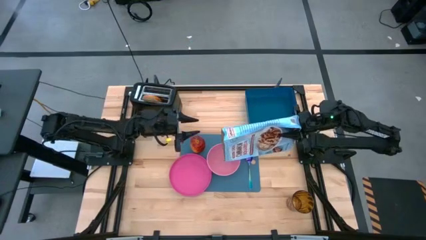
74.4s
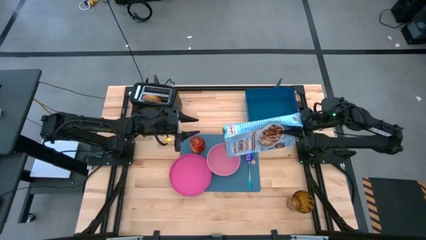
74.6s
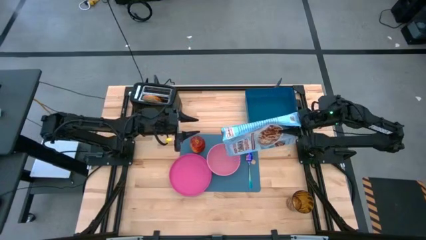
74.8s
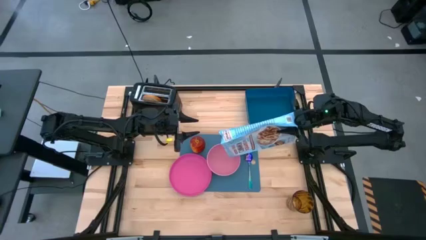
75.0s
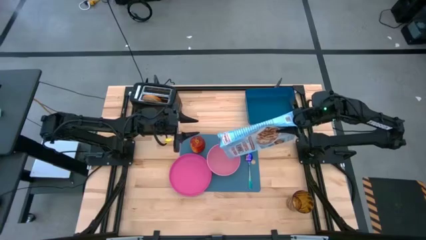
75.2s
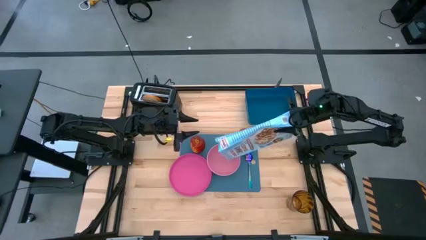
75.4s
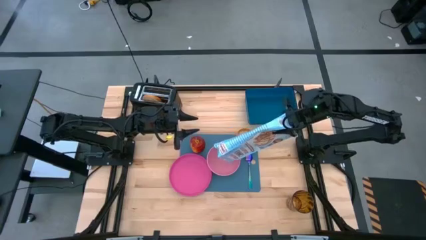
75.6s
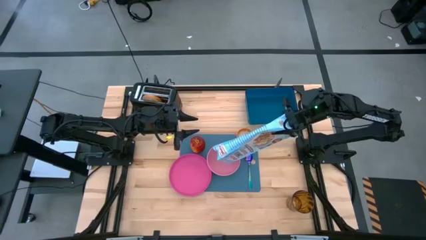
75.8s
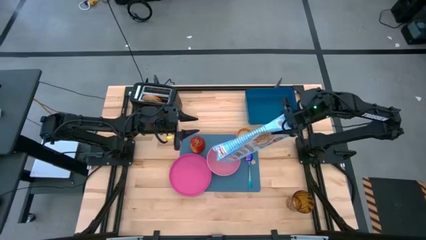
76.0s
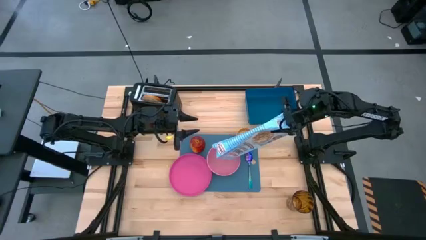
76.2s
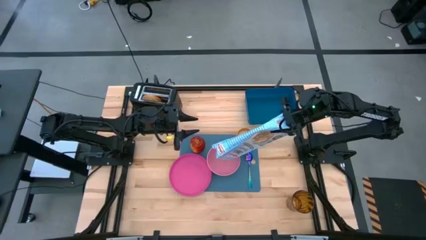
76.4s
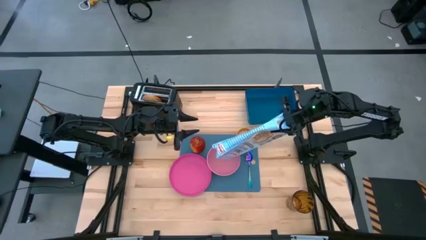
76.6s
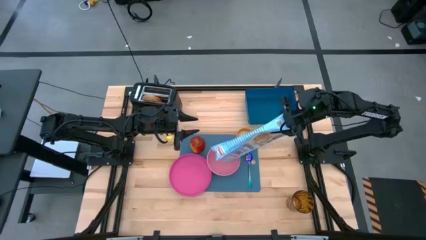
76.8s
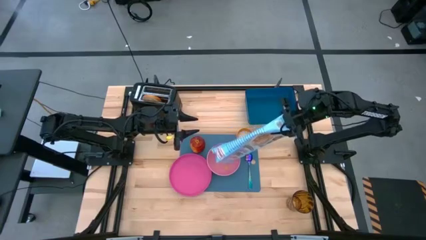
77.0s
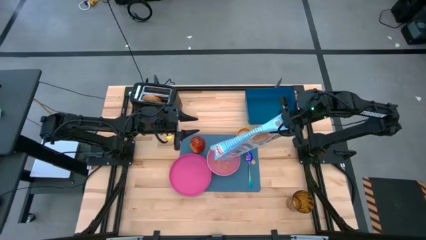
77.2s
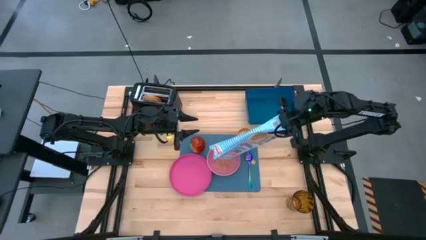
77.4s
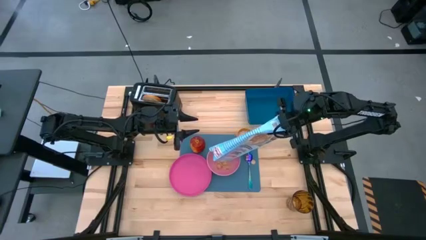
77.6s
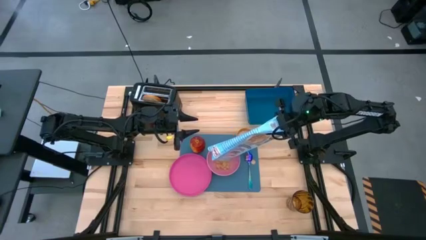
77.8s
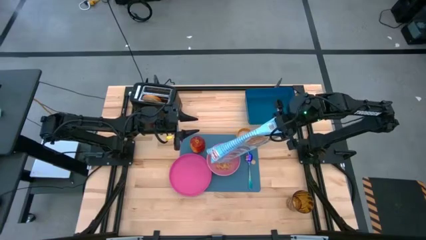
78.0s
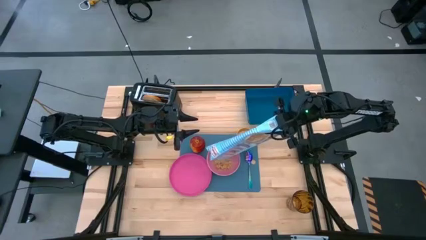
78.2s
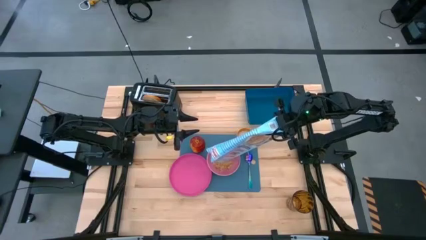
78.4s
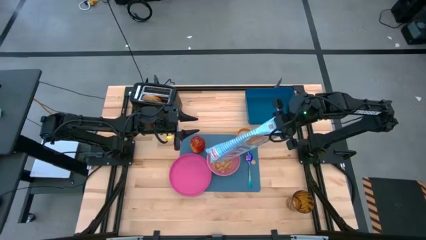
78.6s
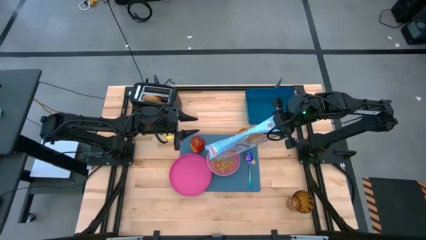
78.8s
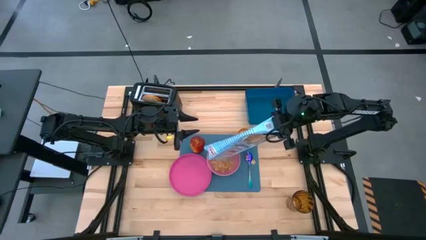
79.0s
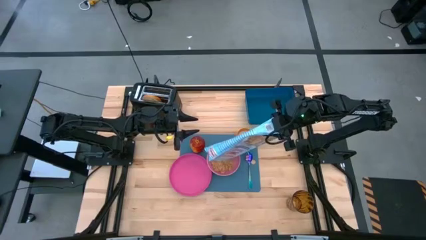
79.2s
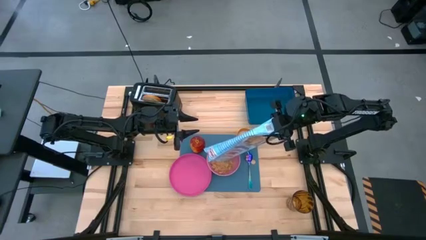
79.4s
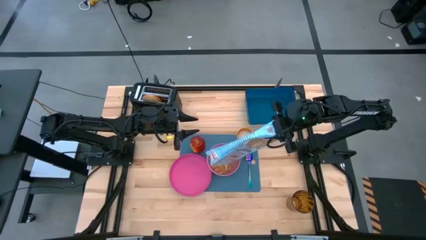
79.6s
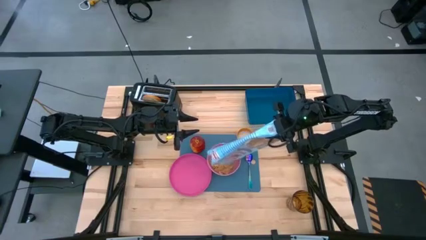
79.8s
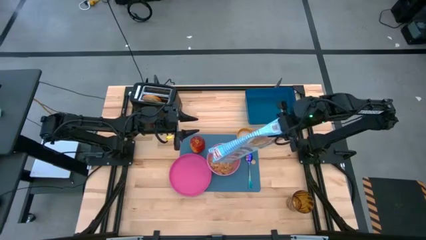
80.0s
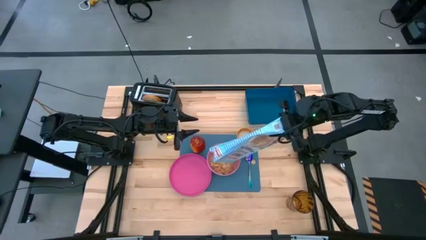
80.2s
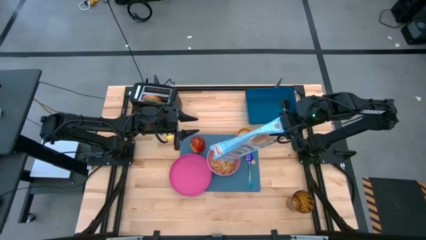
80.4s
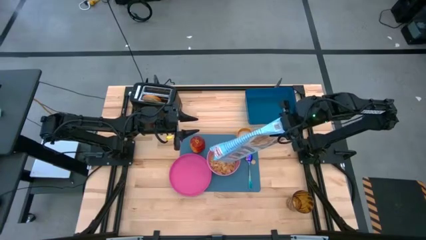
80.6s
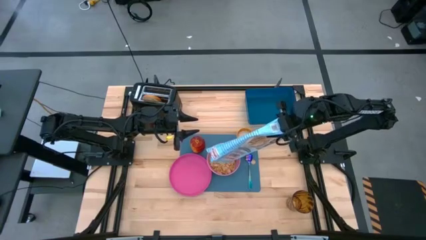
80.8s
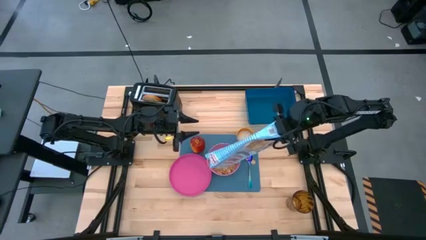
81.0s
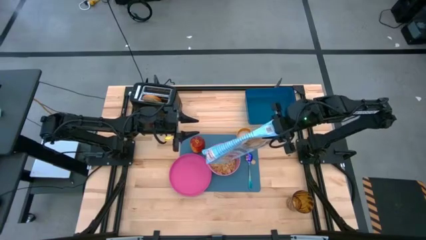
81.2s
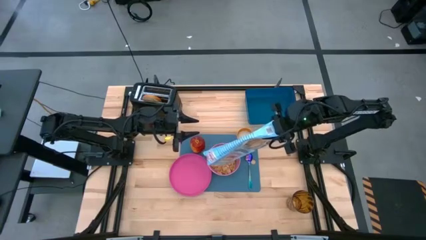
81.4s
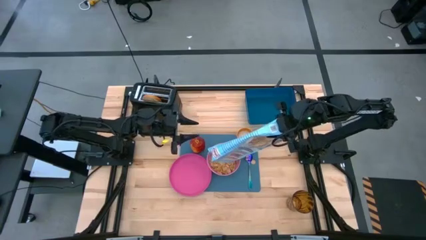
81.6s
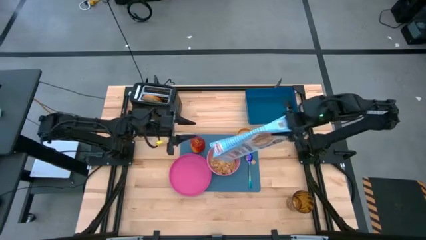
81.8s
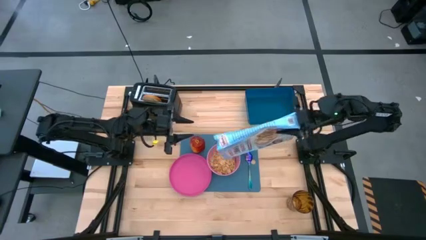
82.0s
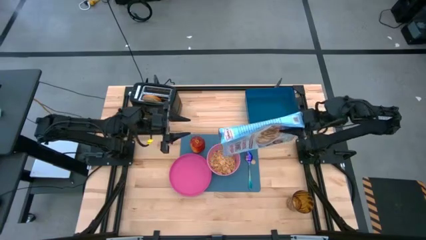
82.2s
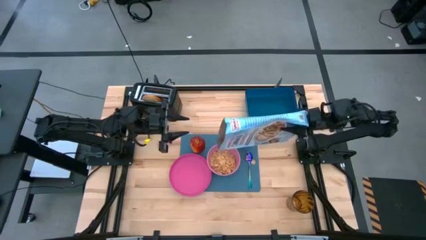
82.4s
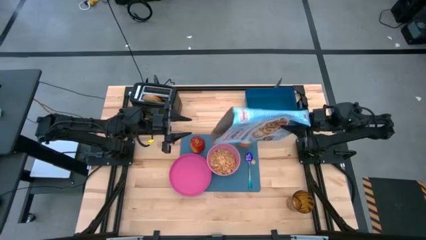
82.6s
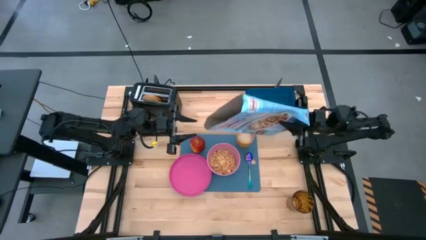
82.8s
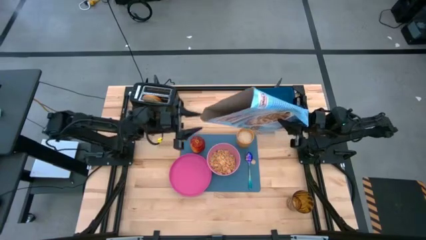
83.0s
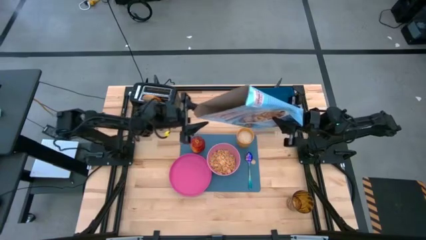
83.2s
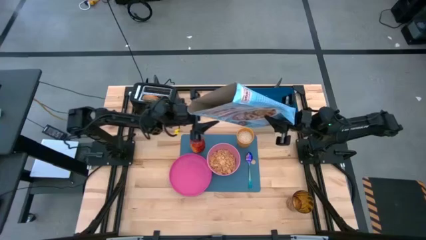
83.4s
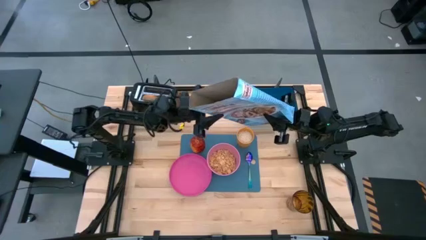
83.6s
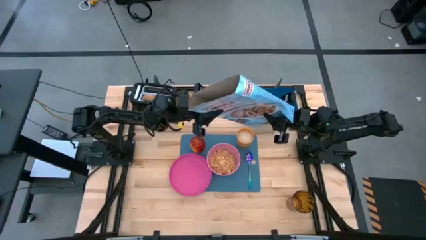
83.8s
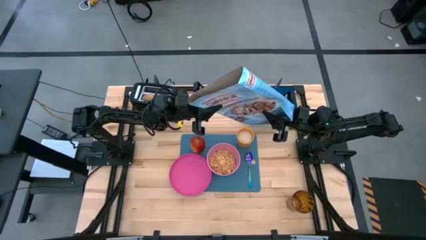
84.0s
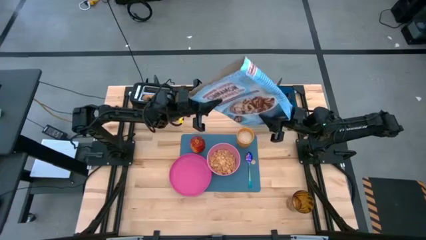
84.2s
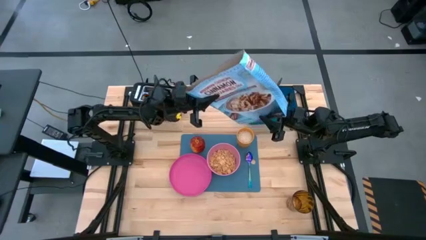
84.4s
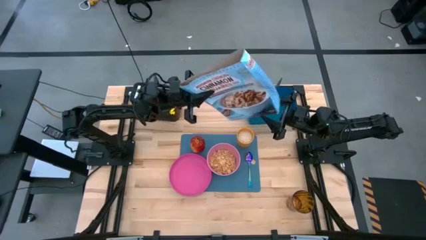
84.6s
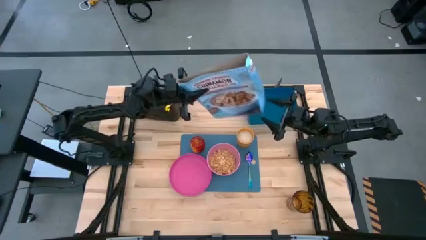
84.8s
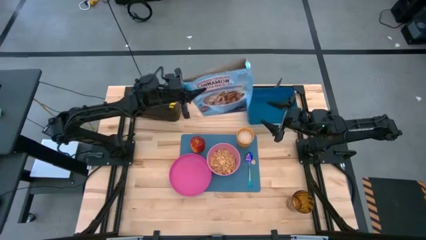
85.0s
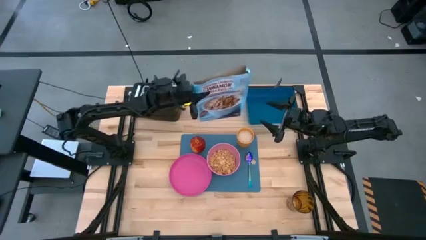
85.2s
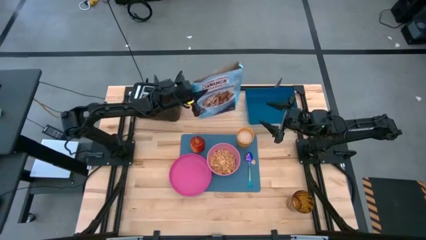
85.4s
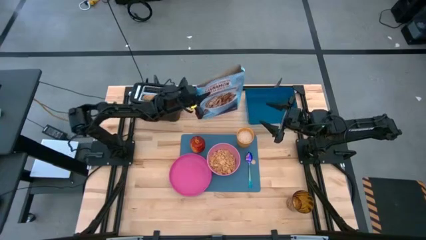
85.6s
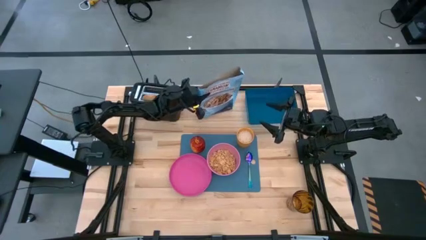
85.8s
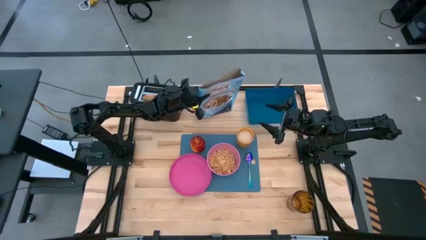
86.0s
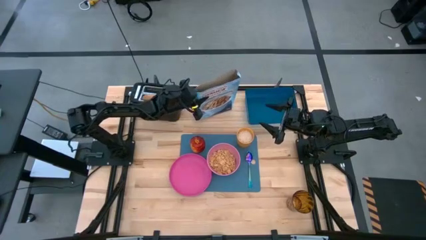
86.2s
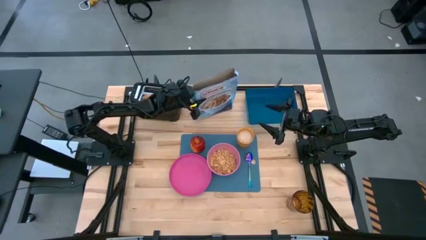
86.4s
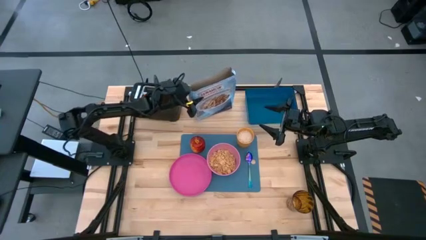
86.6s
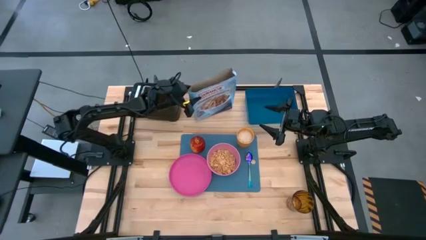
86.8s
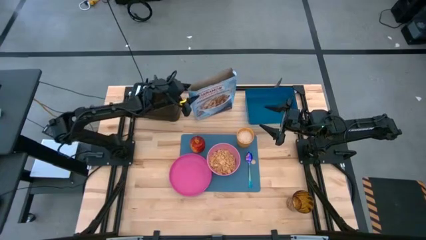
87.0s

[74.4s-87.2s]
Task: Arrange a breakfast setting
Pour the cereal into the pink bowl

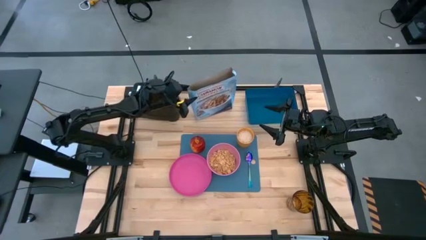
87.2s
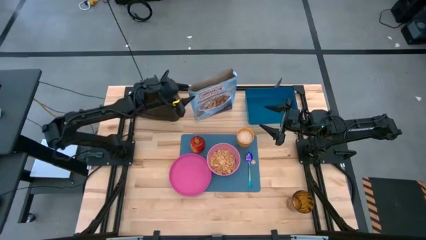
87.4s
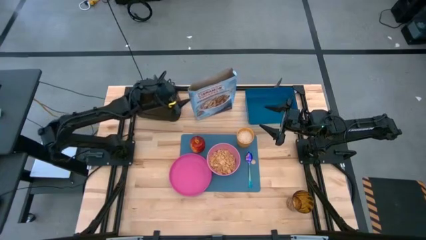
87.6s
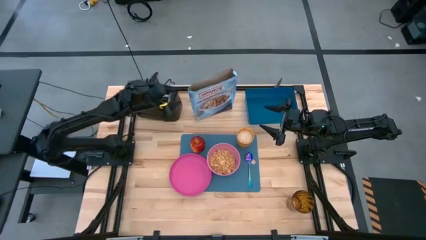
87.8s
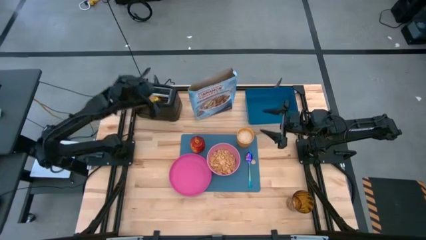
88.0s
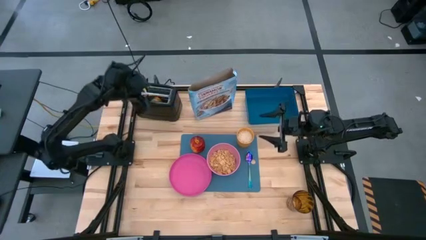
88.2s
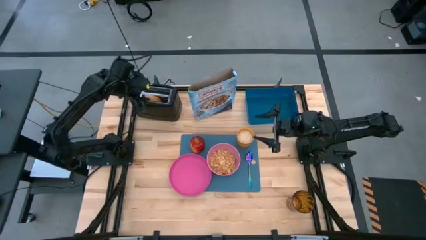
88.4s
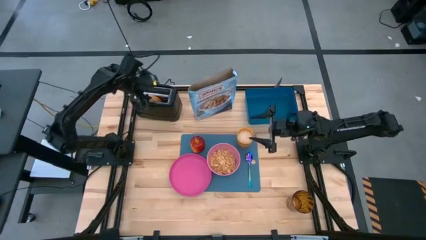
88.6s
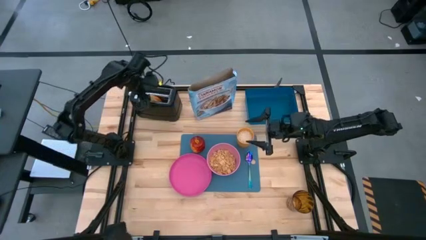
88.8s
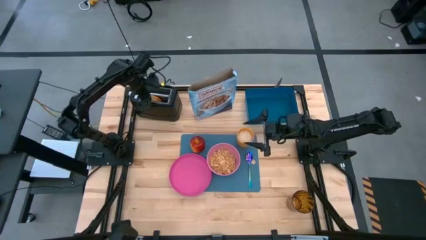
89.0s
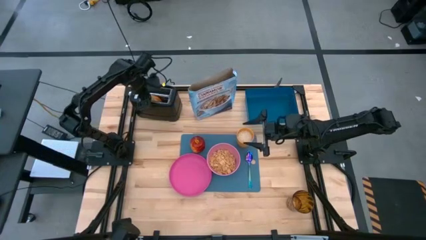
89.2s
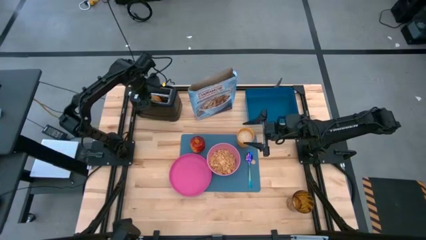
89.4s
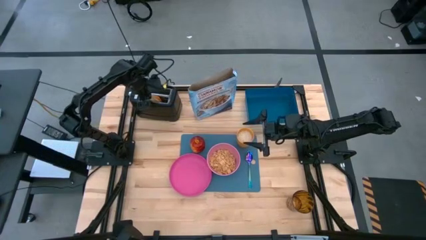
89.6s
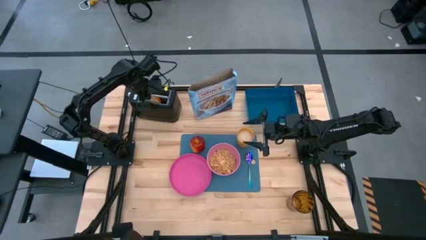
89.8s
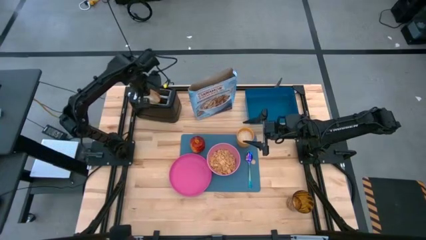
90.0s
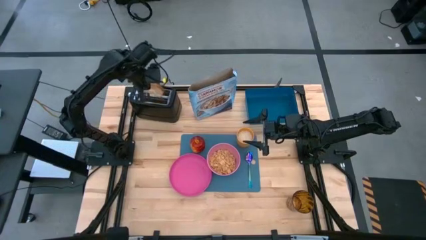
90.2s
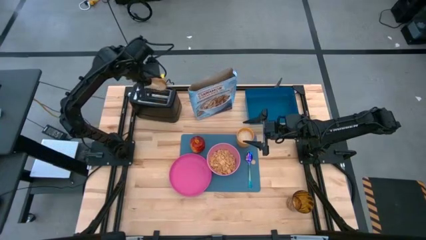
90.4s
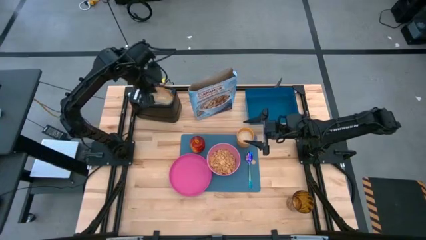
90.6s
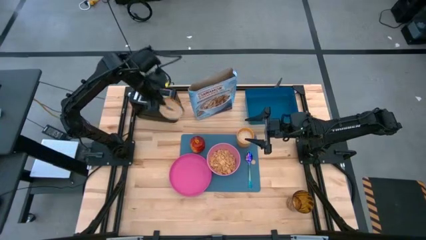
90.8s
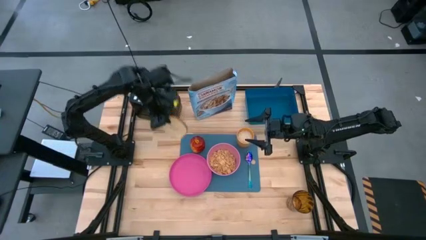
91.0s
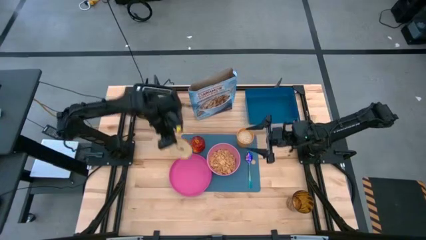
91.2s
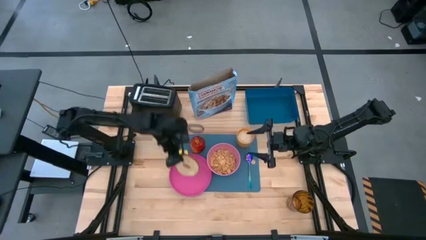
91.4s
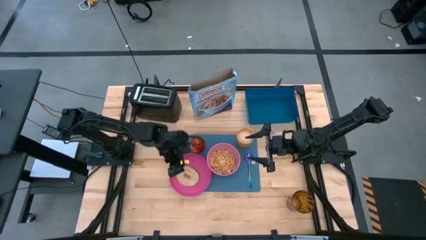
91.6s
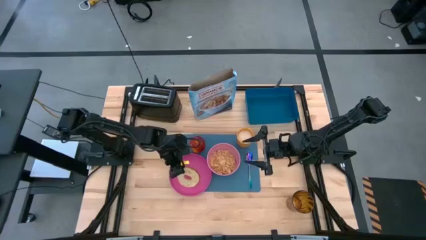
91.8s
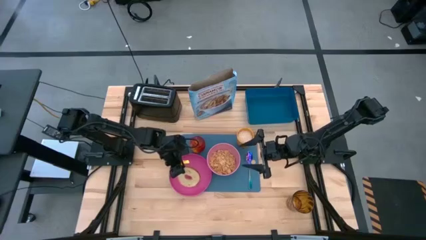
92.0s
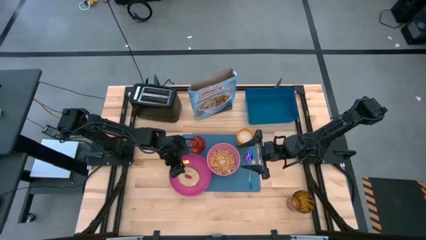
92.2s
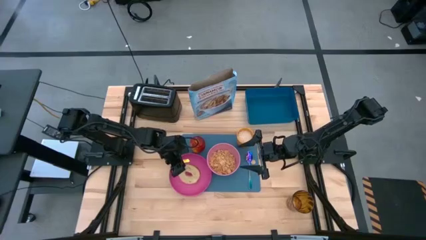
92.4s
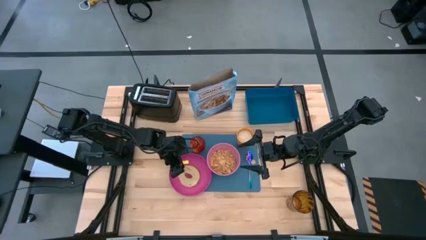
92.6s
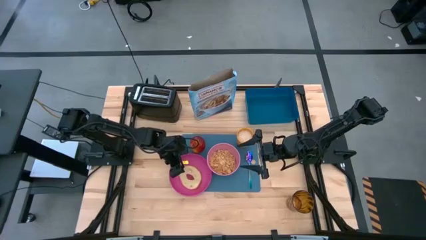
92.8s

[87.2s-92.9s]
Put the bagel on the pink plate
